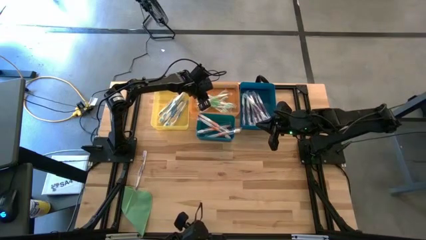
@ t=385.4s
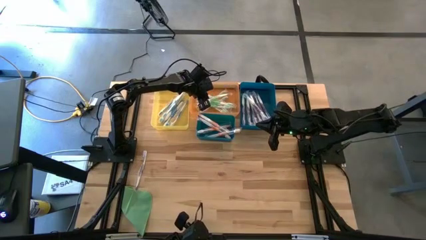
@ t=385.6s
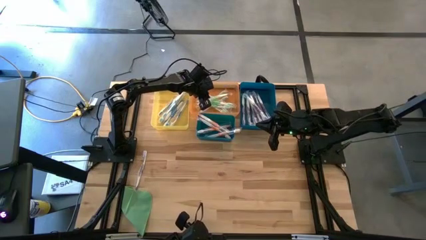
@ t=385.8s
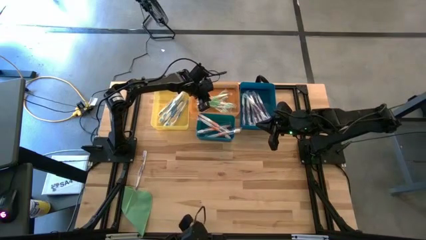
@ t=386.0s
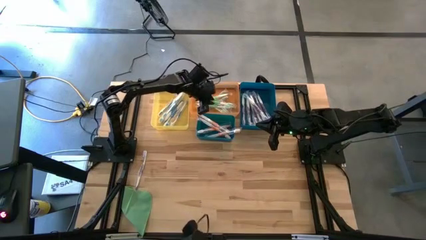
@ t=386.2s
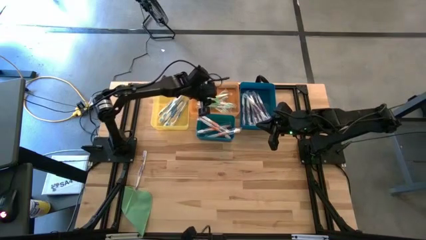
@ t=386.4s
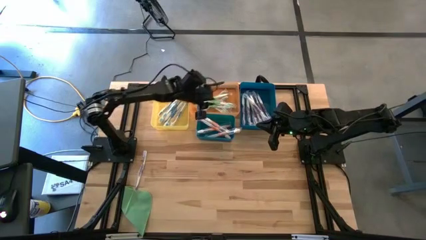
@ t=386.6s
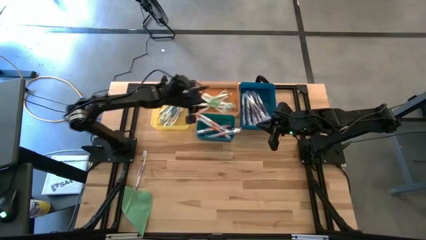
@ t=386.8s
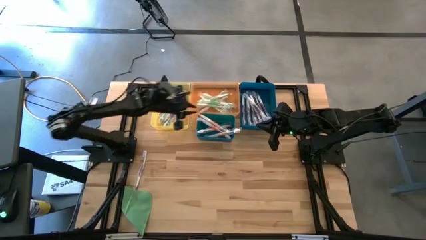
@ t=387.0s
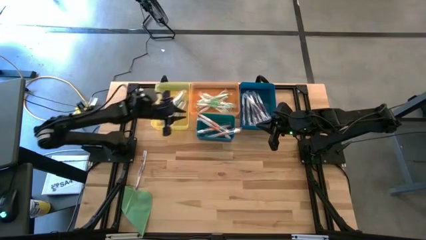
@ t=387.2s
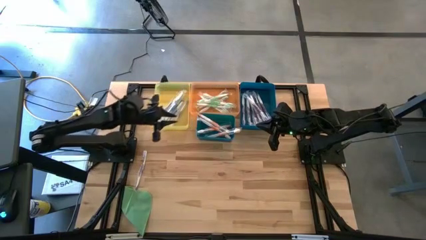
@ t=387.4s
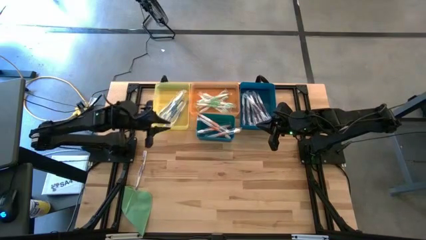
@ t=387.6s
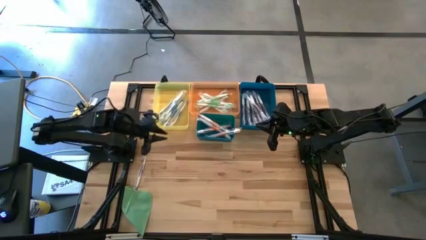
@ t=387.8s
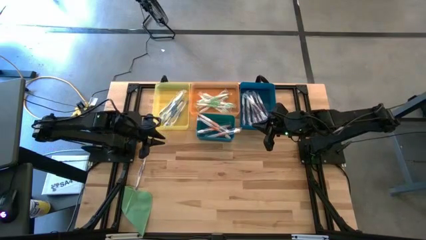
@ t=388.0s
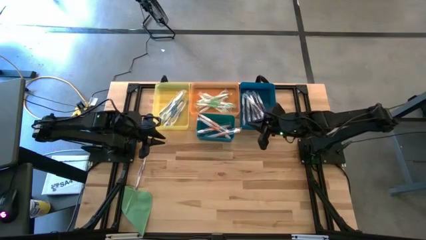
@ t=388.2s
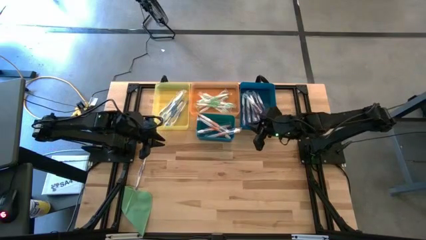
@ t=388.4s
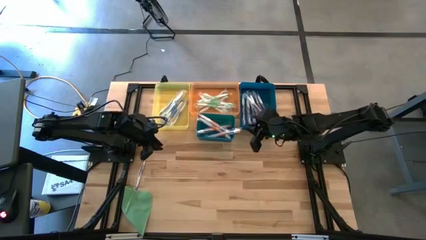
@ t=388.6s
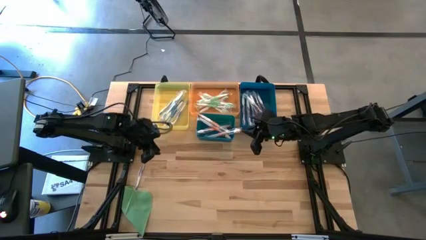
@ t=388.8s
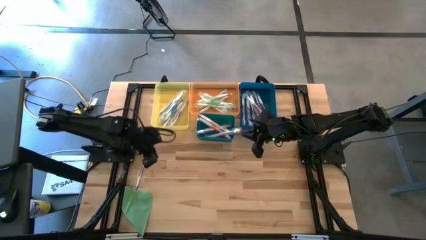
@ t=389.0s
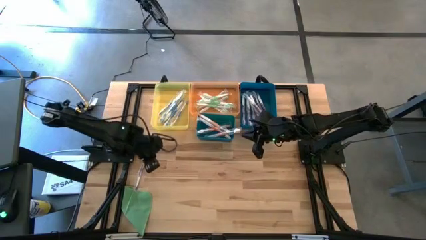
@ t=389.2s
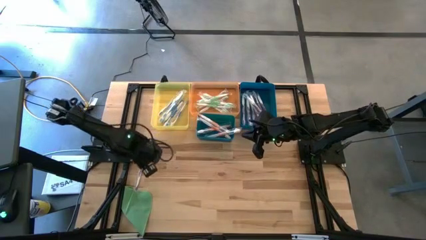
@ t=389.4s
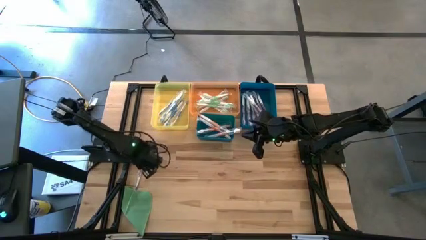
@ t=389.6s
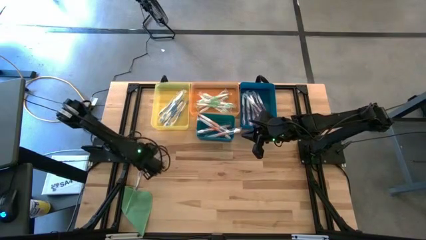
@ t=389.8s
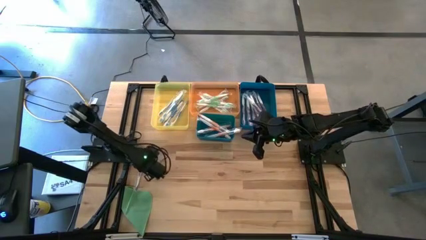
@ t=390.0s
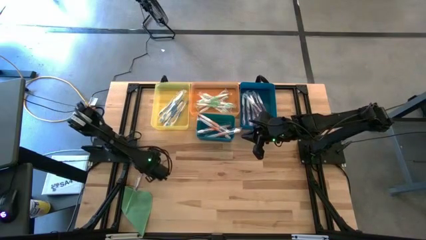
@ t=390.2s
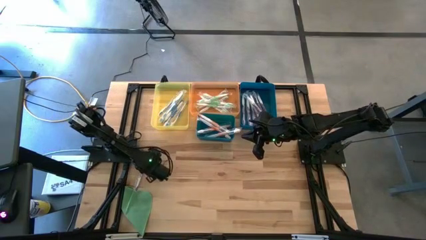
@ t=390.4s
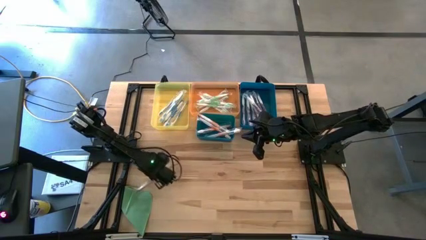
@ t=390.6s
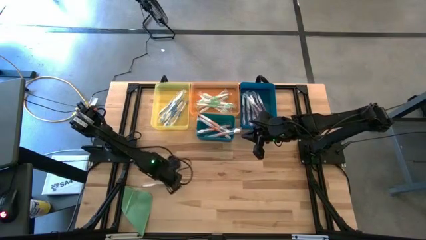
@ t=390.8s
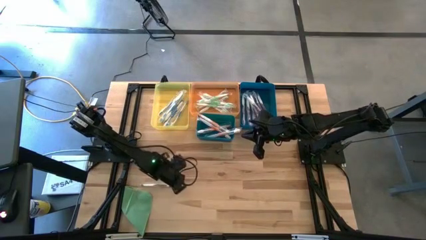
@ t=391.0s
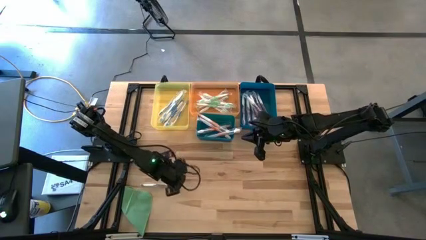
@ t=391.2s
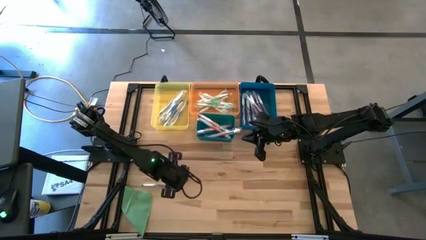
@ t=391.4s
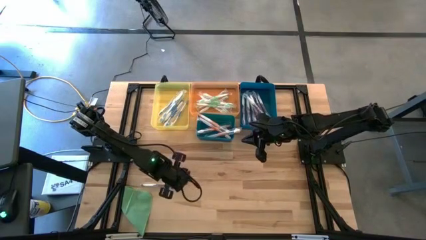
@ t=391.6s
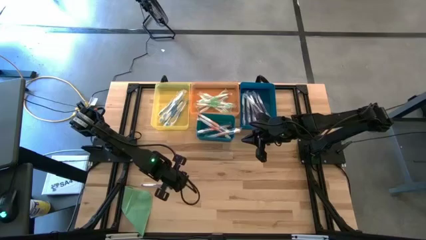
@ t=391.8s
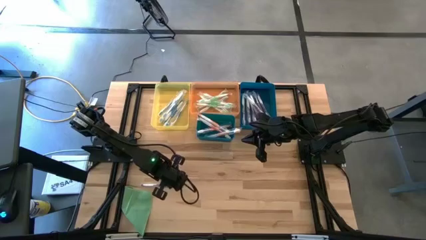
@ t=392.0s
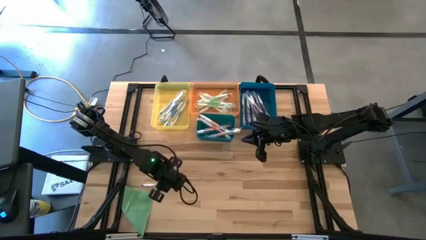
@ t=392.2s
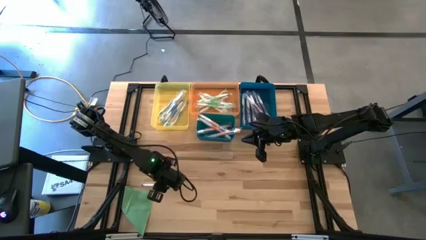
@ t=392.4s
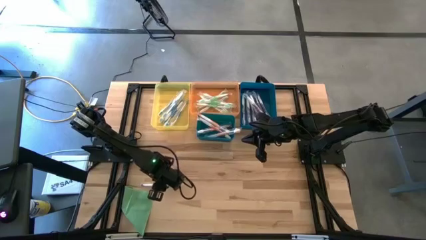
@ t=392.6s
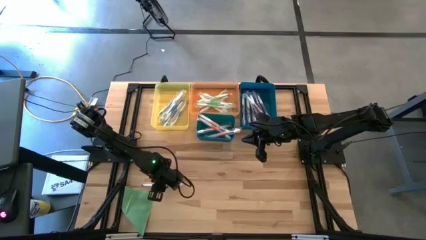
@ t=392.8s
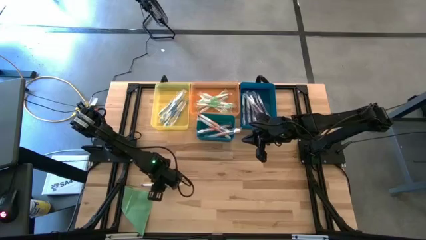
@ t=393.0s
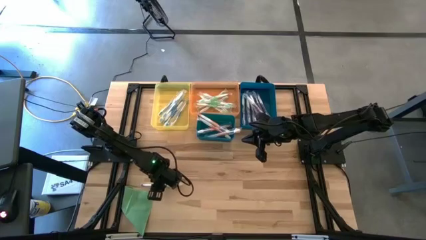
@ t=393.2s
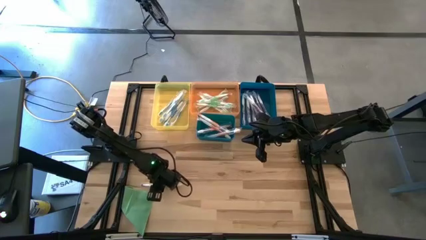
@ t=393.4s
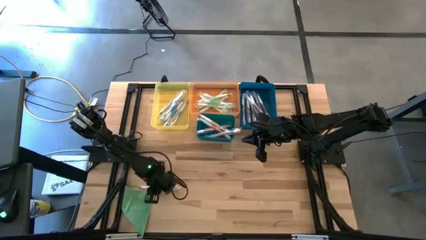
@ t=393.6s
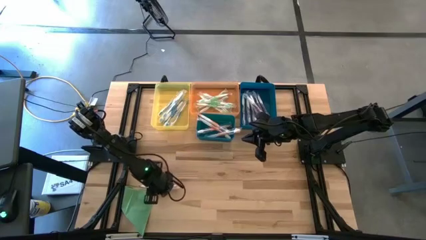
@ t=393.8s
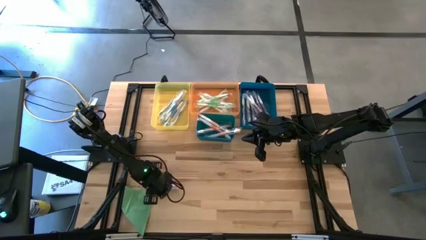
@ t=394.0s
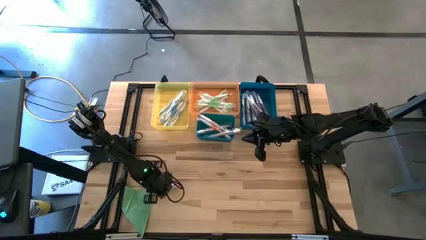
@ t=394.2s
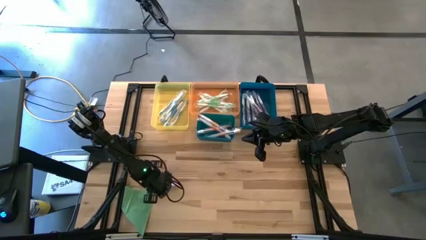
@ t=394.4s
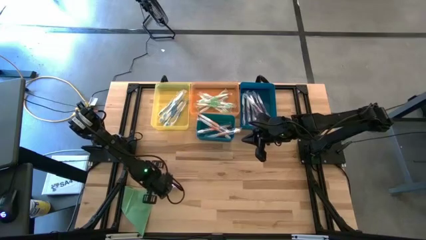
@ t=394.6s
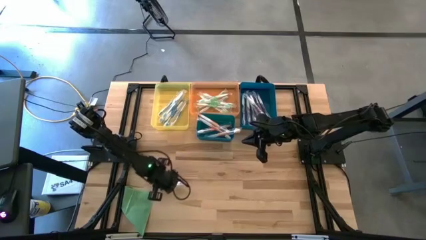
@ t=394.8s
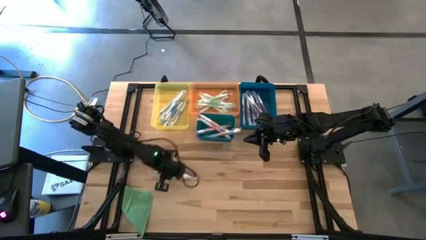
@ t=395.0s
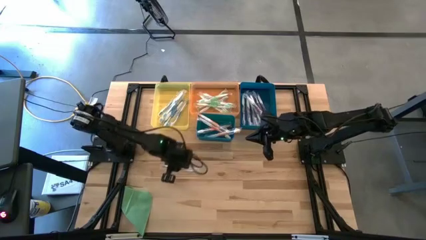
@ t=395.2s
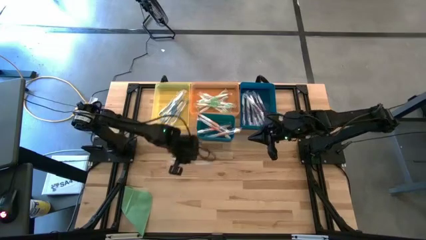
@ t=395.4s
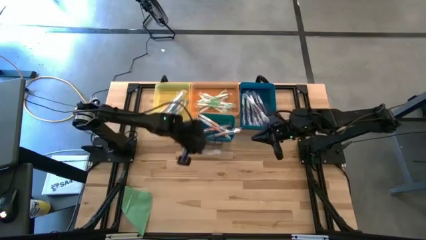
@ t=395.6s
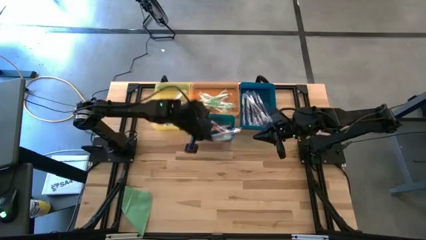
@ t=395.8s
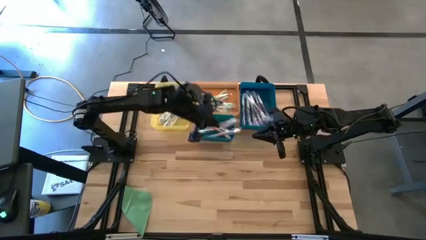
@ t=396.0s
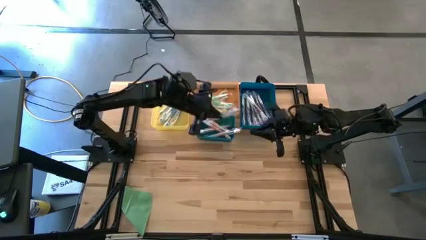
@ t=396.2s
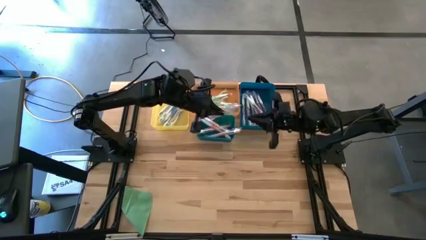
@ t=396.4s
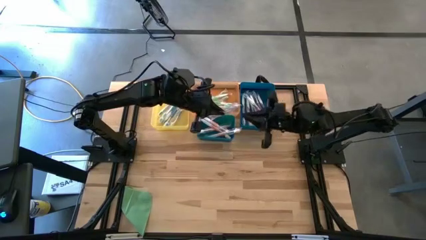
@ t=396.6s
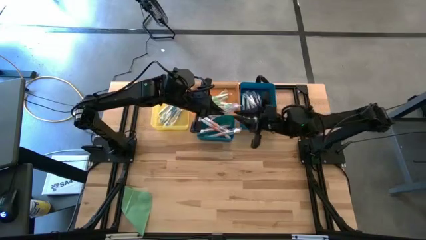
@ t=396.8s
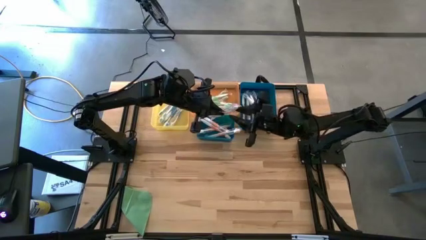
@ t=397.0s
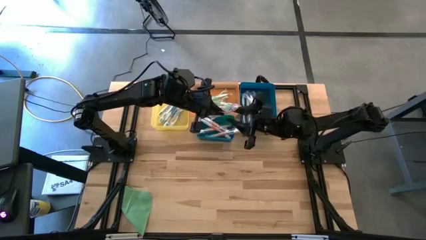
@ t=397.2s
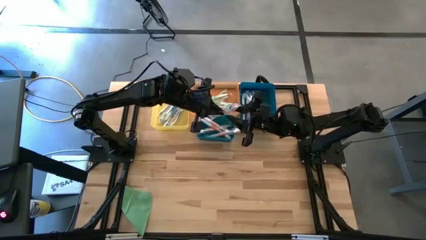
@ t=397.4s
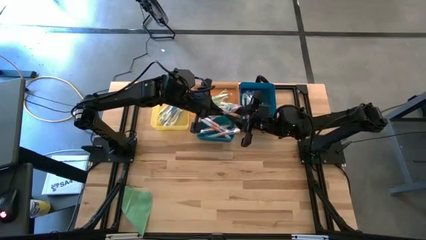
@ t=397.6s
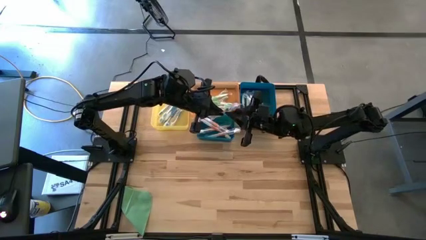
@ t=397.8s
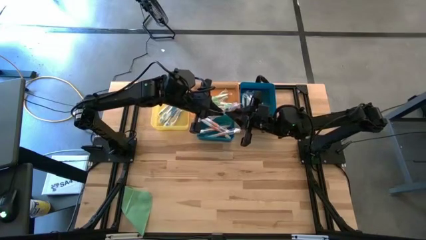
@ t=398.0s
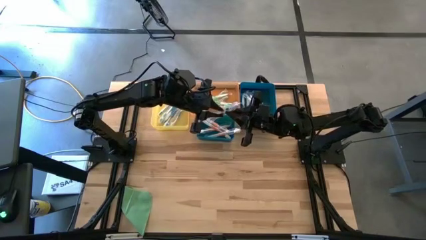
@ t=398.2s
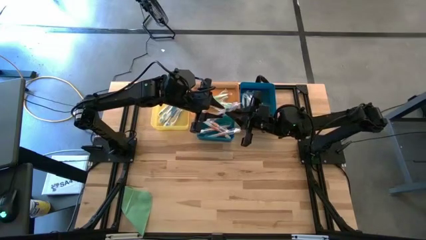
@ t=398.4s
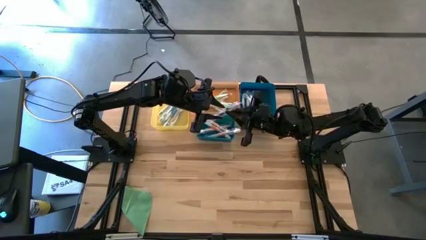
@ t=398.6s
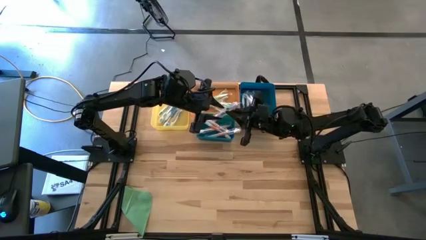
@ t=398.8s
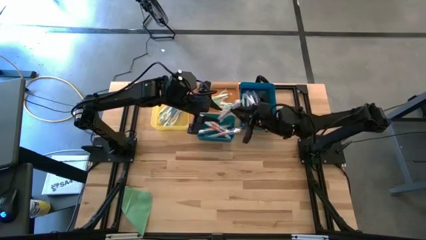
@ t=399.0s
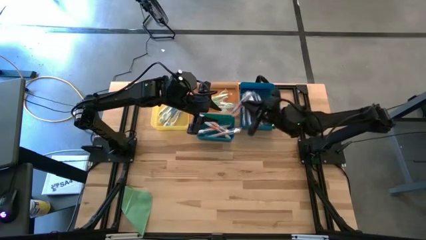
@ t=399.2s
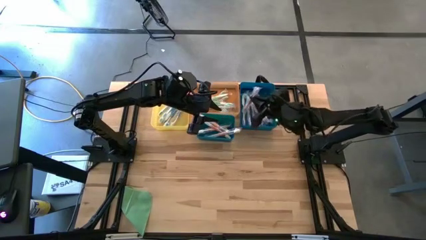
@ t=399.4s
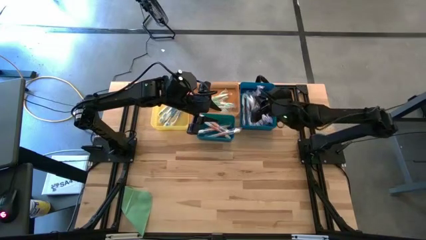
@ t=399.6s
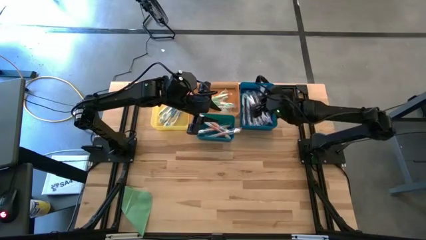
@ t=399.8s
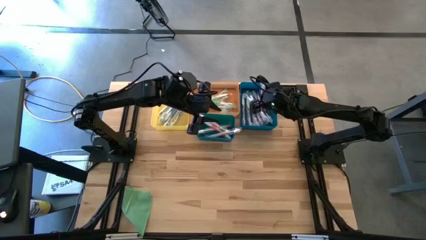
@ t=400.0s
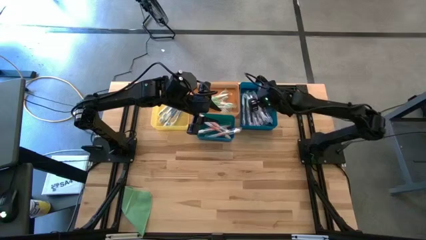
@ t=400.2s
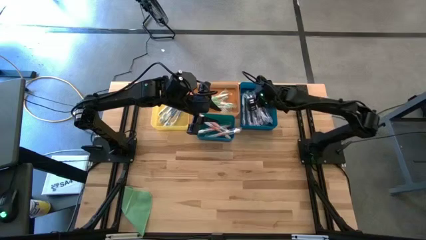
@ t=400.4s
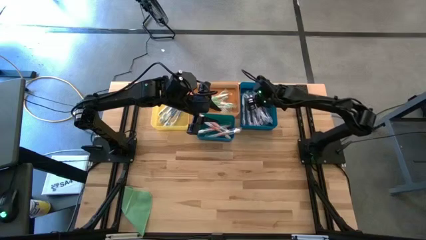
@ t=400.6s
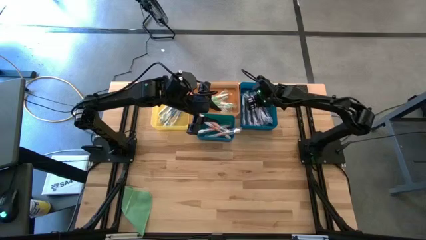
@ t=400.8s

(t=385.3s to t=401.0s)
Task: Pick & Place Toothbrushes
Put the purple toothbrush into the blue bin
